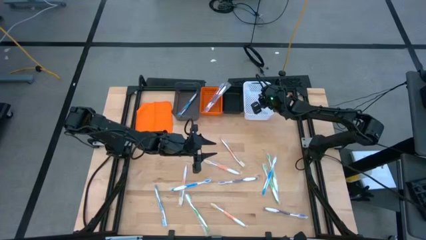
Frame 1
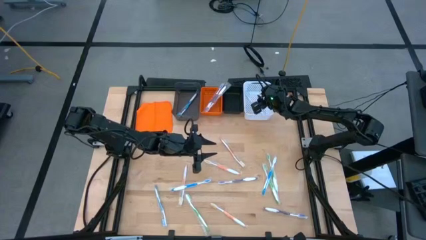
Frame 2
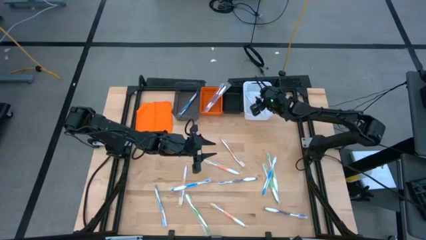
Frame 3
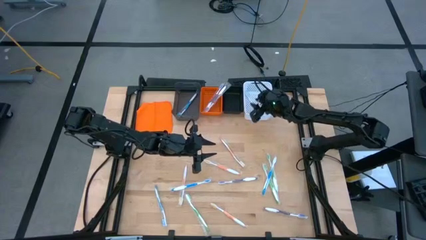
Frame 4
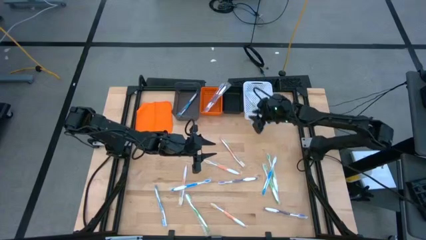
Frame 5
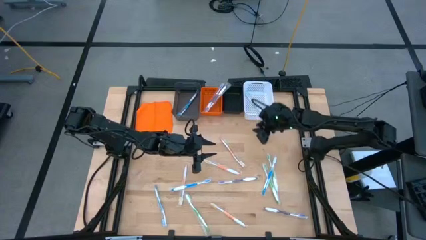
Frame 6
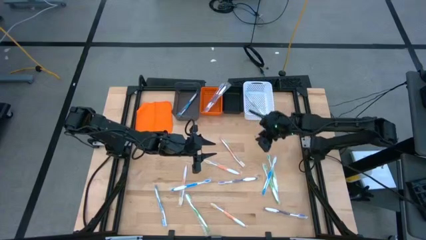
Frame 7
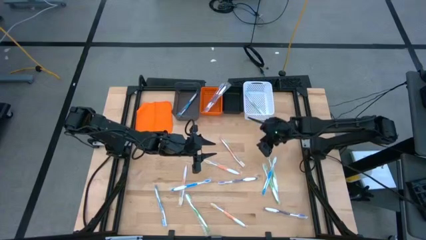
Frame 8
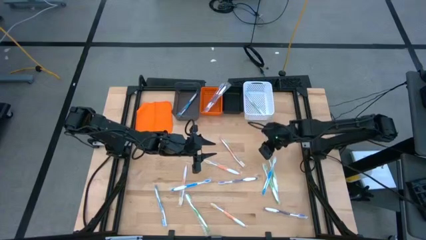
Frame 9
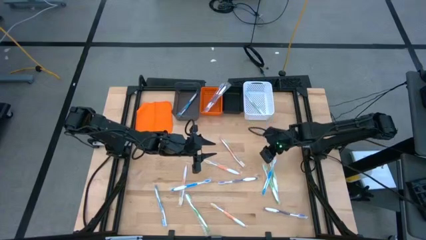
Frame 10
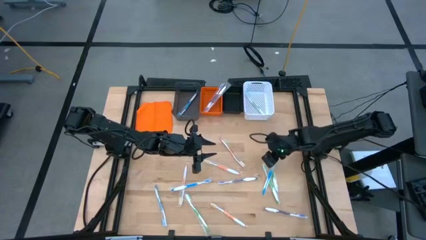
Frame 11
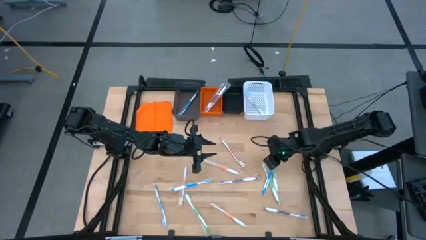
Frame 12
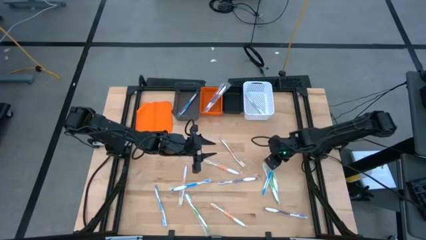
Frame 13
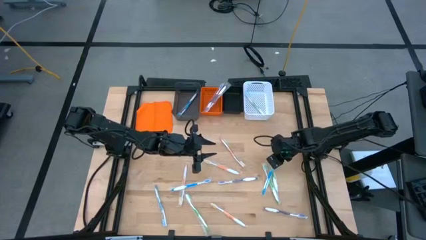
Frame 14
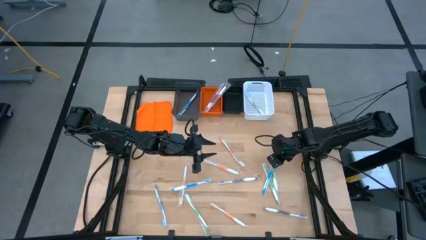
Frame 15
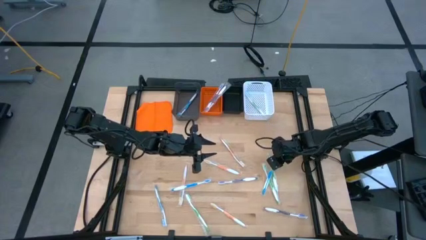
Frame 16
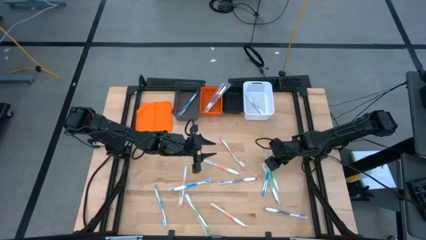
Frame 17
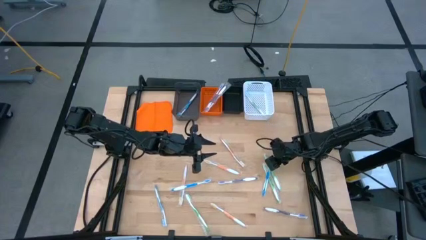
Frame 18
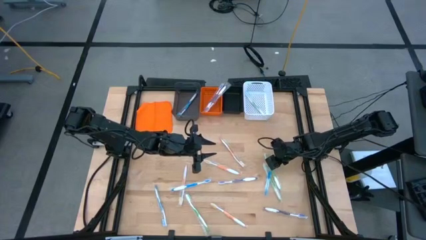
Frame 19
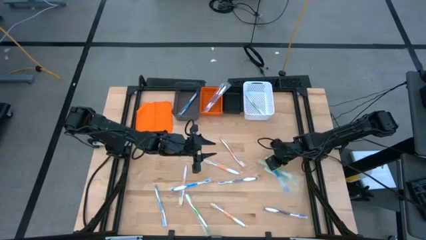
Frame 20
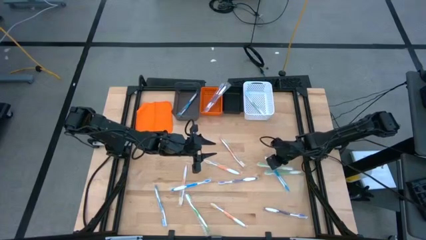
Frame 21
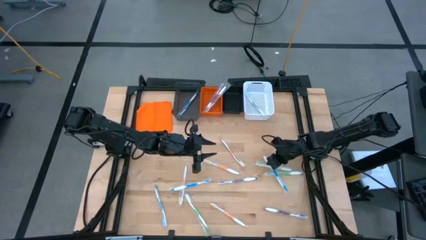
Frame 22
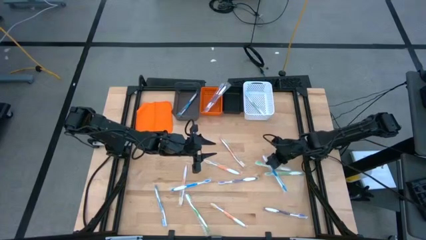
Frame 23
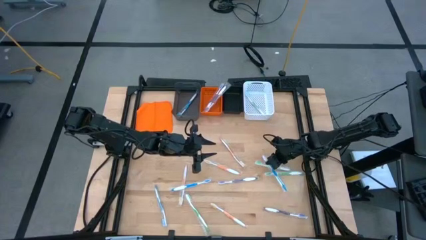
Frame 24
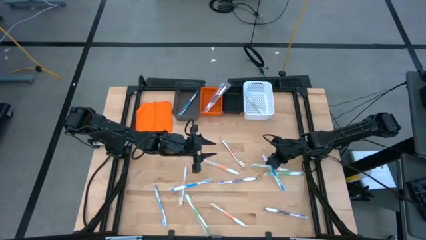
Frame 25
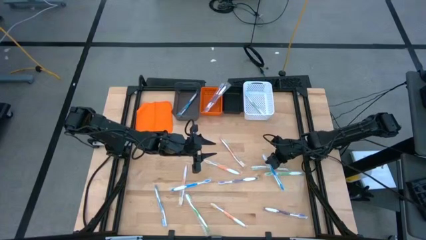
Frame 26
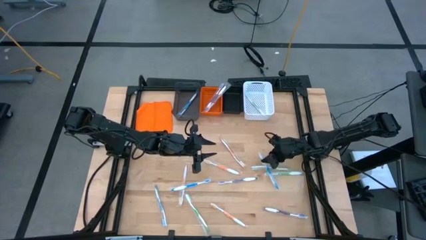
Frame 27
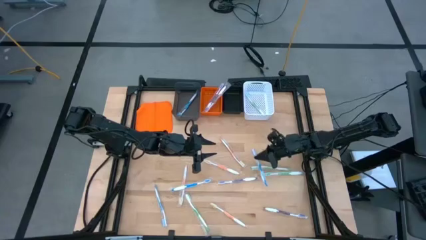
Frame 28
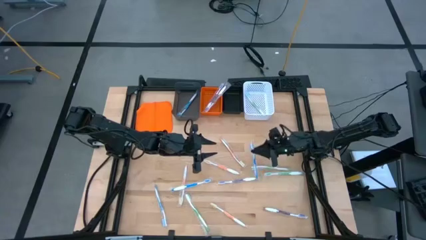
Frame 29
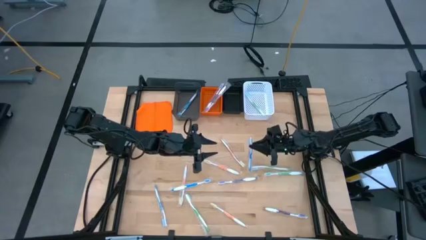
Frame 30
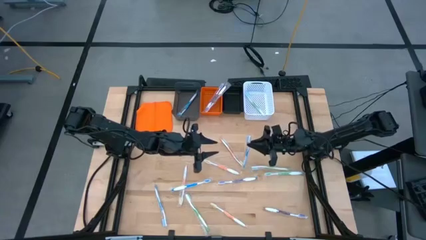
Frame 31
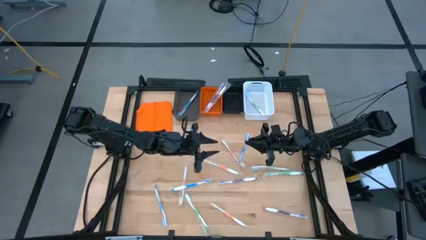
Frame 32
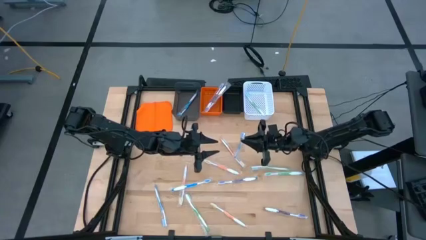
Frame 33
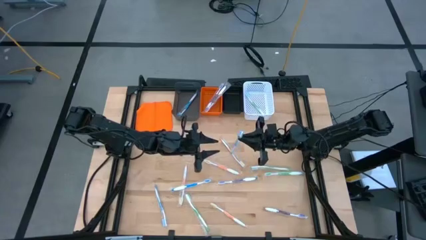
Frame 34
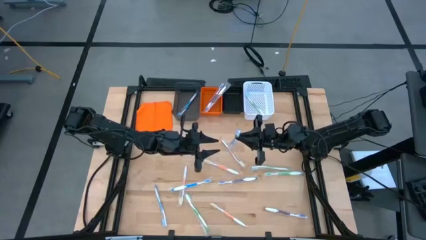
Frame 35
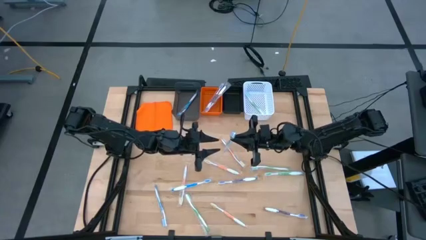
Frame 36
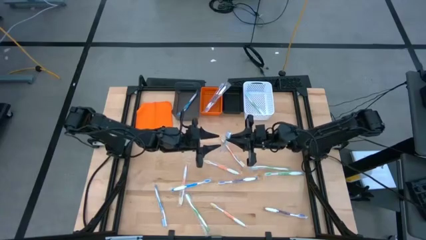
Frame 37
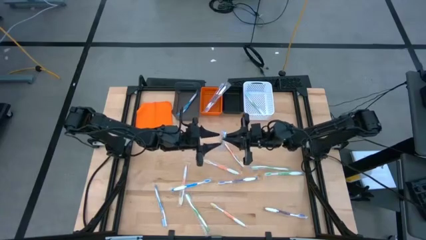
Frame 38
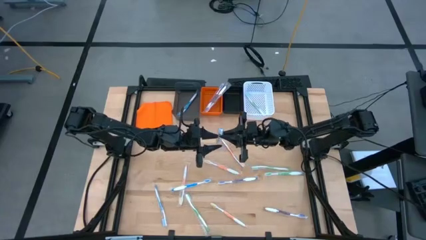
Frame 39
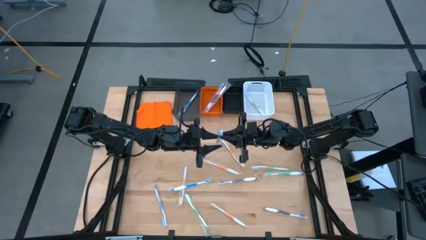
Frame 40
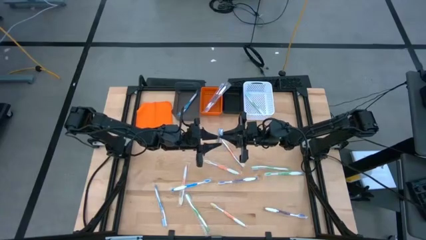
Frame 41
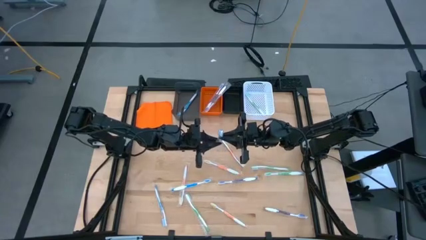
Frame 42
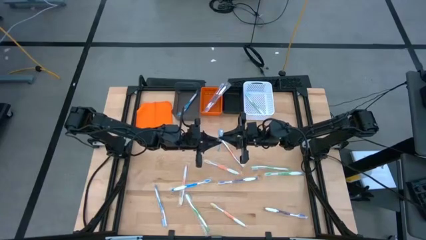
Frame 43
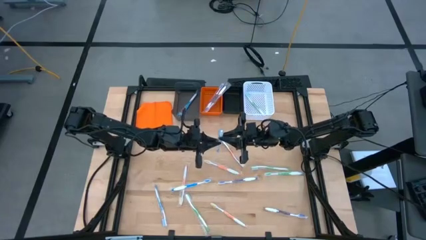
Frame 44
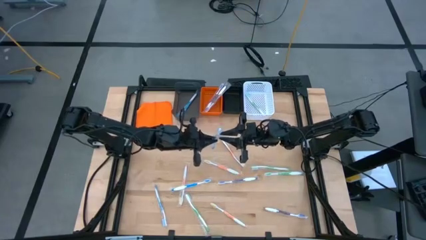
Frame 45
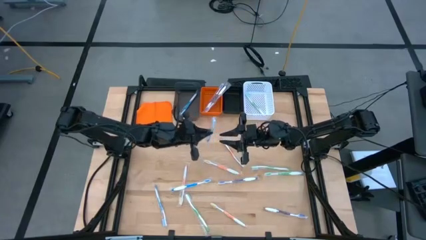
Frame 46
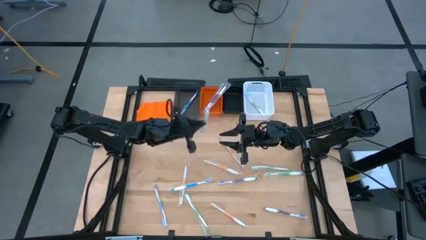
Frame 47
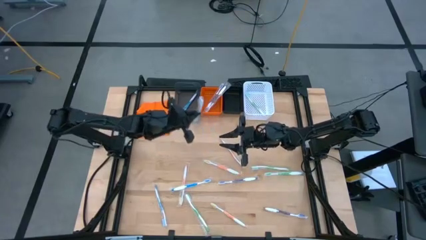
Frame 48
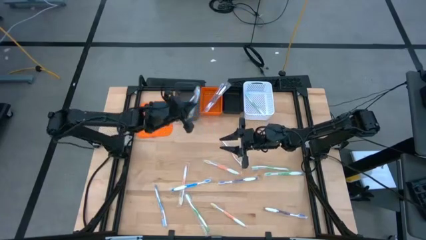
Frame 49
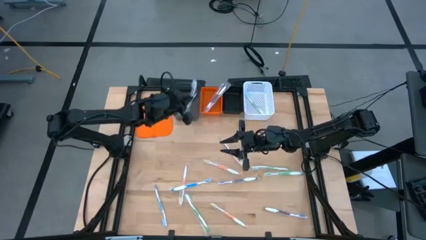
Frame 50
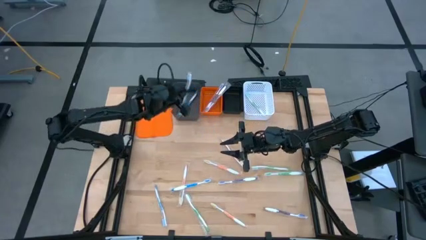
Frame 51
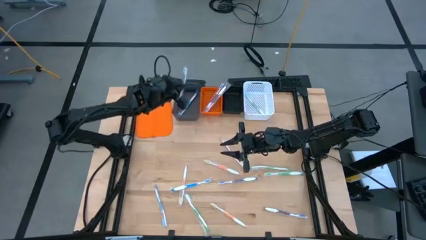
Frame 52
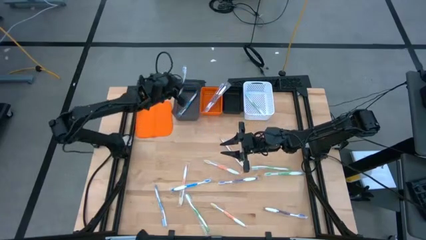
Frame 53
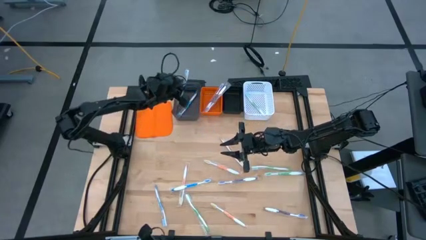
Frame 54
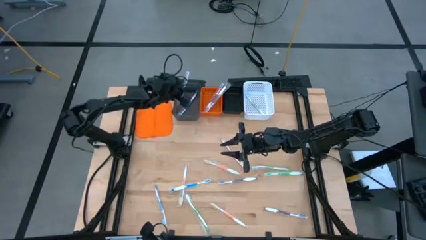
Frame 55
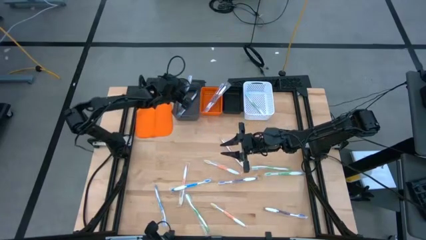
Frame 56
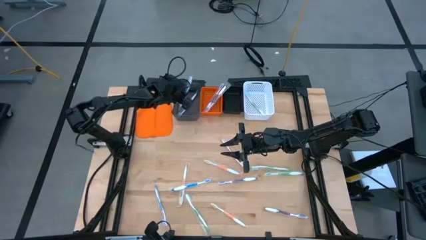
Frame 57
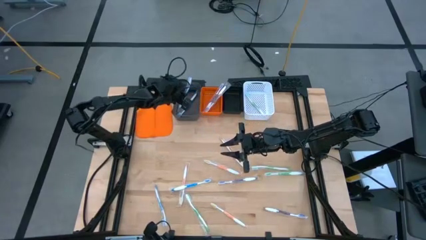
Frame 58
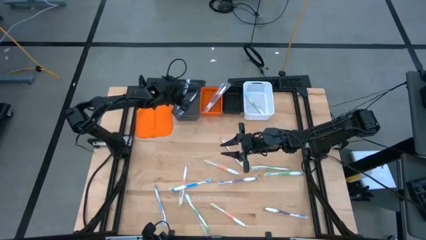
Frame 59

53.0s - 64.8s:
Task: Pick & Place Toothbrushes
Put the blue toothbrush into the gray bin

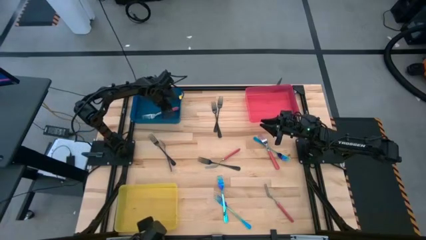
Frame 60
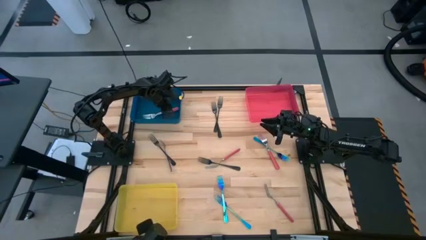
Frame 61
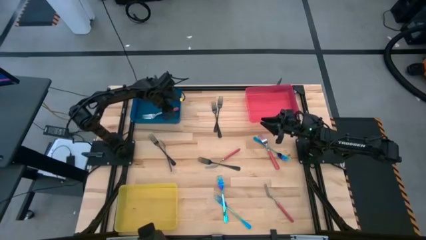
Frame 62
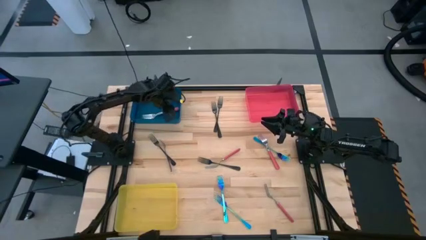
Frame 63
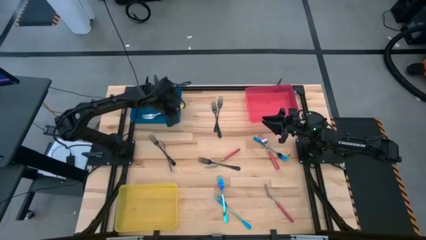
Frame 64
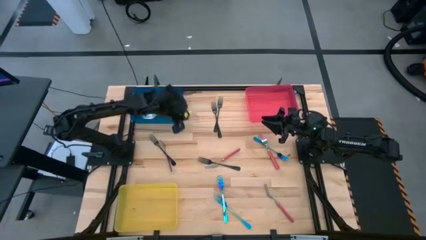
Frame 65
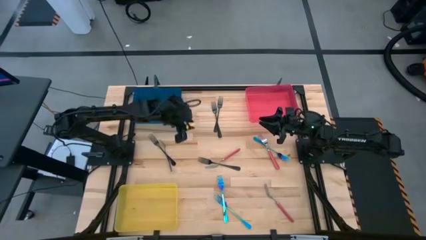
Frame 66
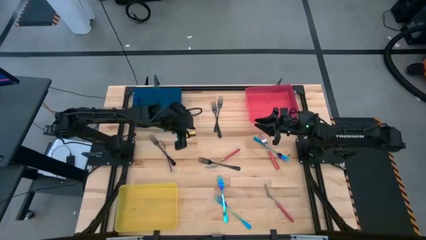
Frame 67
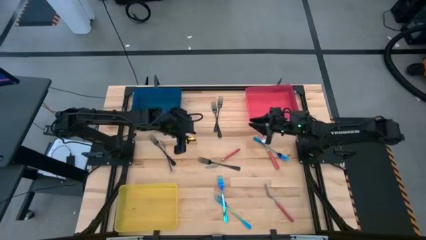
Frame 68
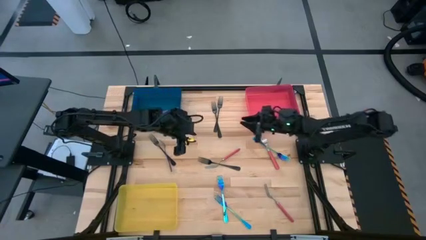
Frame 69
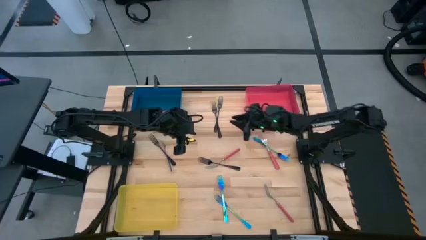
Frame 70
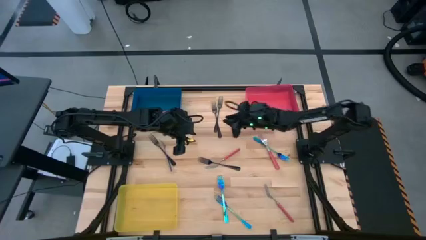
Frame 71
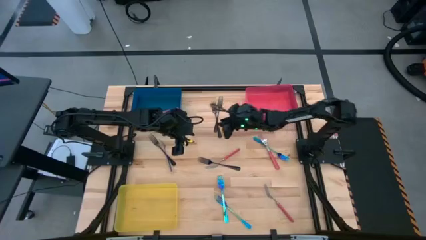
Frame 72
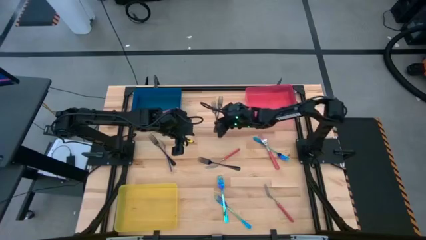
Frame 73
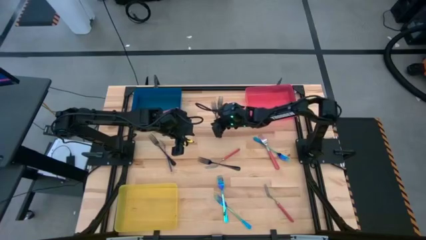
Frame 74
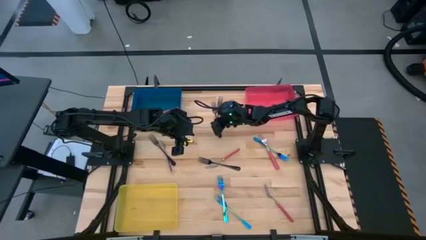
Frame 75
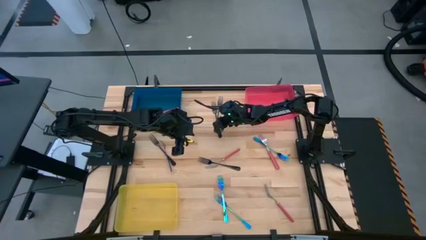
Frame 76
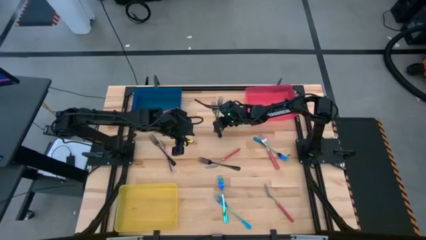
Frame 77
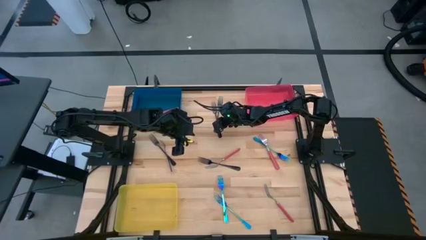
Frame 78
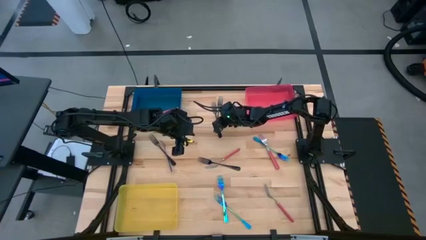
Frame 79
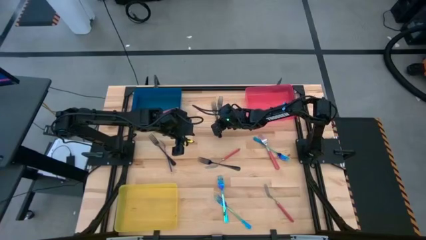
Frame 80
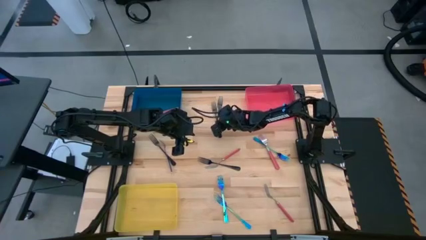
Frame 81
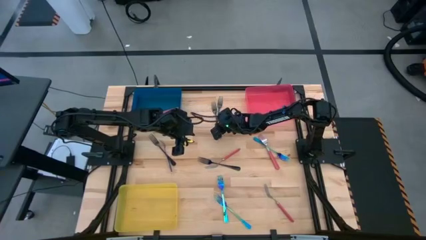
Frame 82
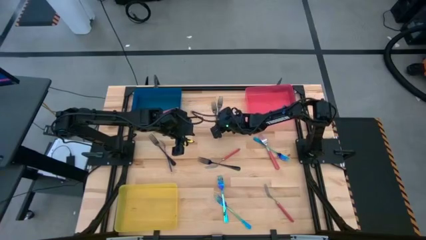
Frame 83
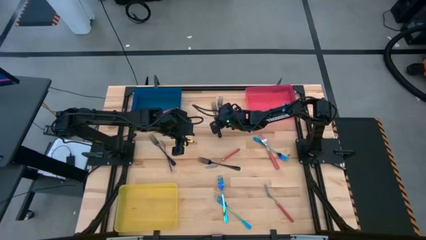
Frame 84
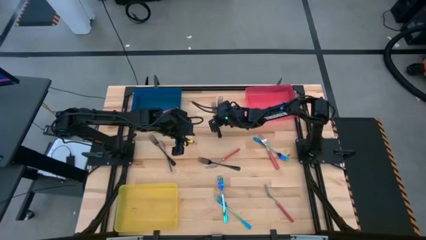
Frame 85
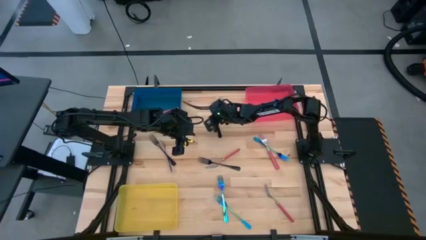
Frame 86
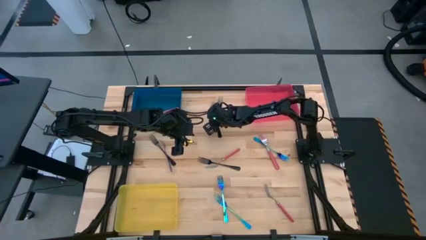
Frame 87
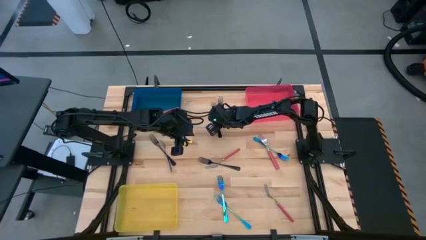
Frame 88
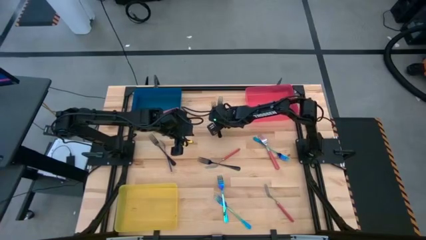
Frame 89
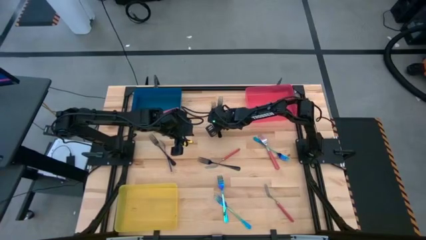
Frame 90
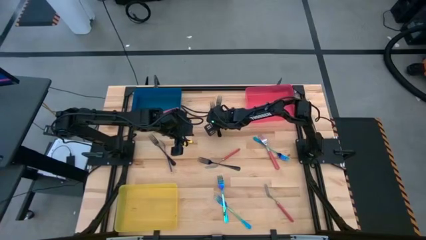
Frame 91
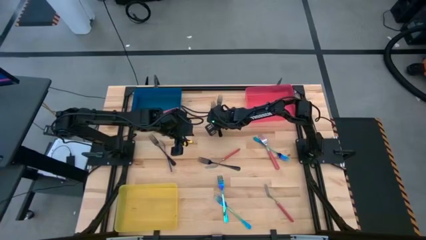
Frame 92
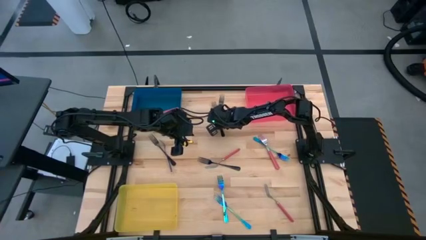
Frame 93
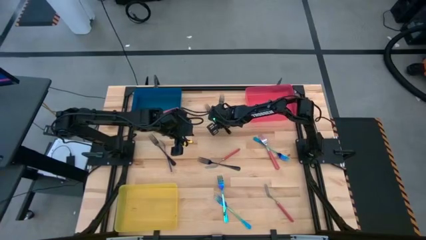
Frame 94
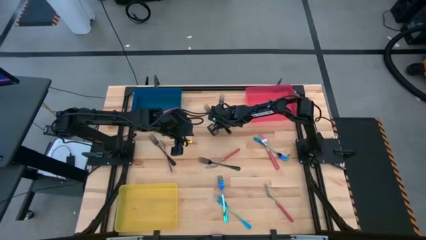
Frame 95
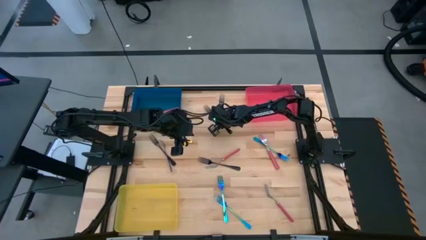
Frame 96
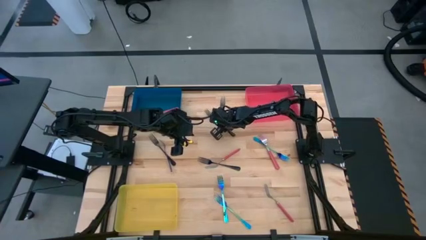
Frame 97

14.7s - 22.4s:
Task: Sort silverware by color (type)
Put the black fork into the red bin
